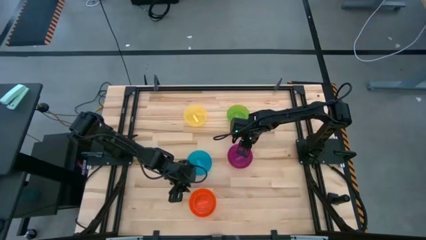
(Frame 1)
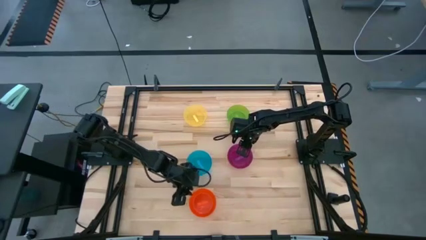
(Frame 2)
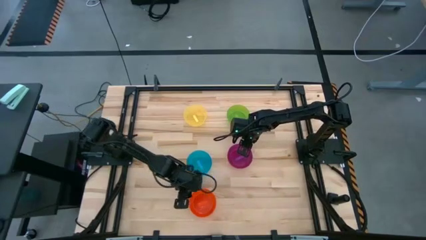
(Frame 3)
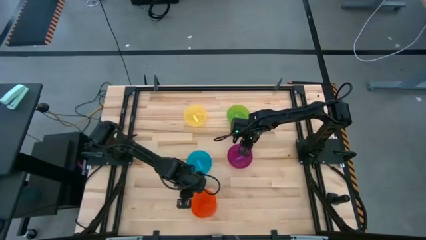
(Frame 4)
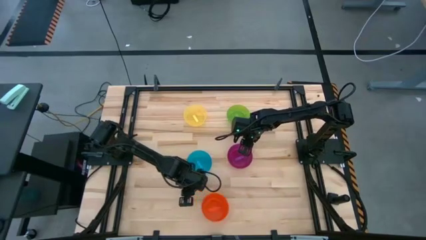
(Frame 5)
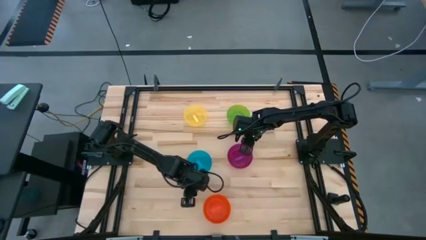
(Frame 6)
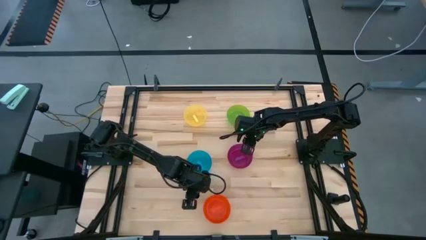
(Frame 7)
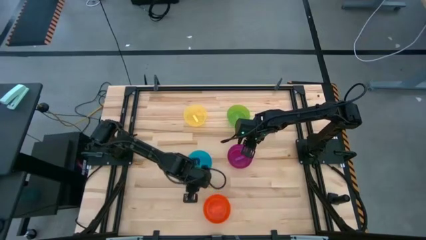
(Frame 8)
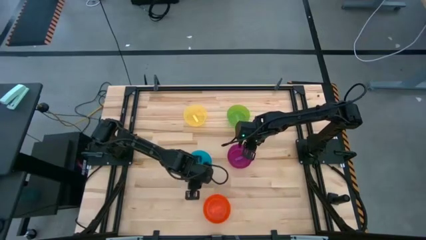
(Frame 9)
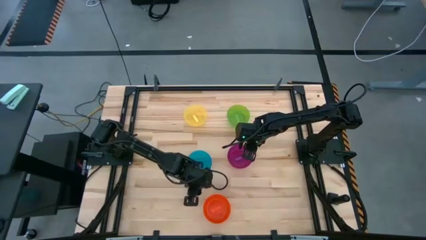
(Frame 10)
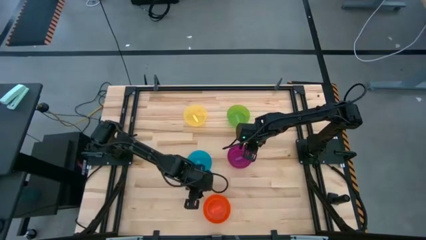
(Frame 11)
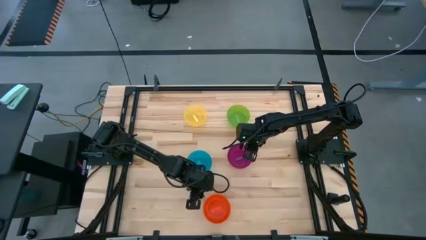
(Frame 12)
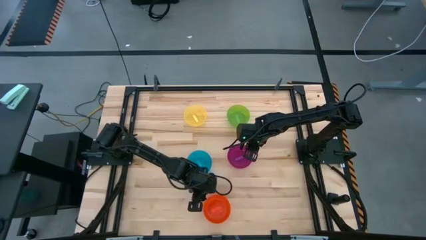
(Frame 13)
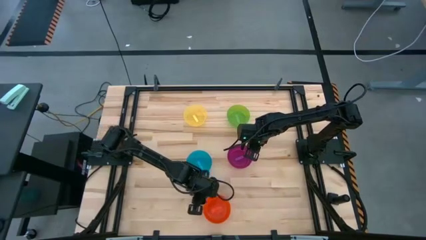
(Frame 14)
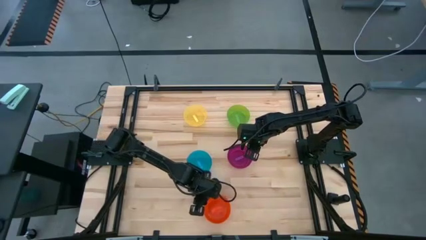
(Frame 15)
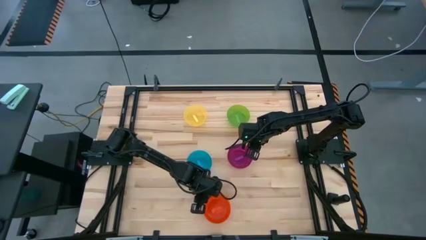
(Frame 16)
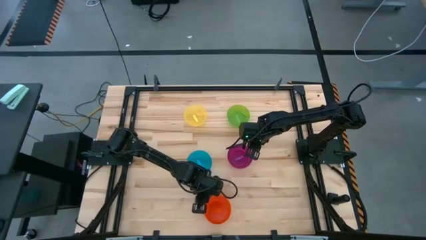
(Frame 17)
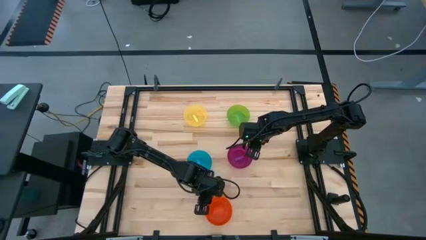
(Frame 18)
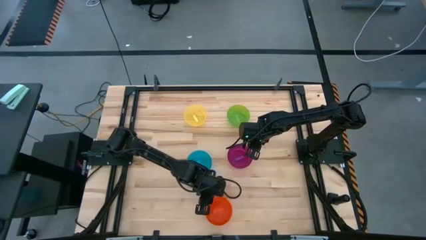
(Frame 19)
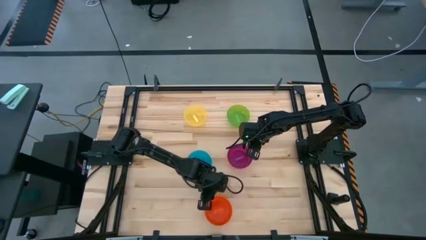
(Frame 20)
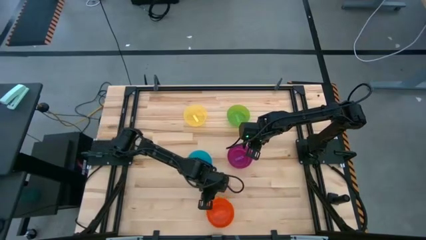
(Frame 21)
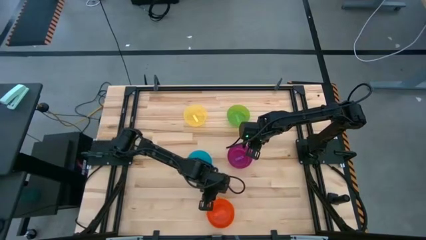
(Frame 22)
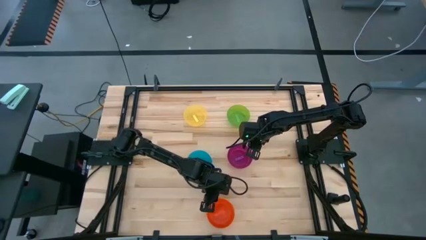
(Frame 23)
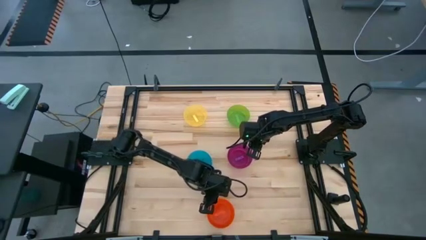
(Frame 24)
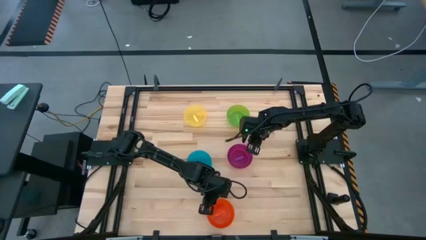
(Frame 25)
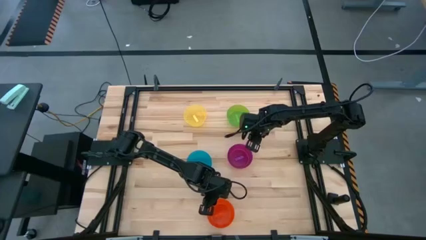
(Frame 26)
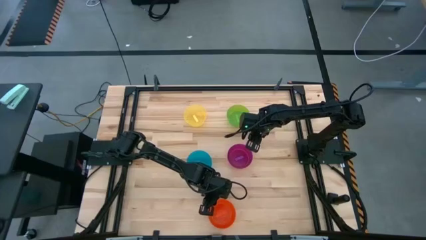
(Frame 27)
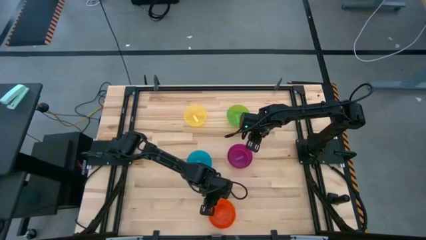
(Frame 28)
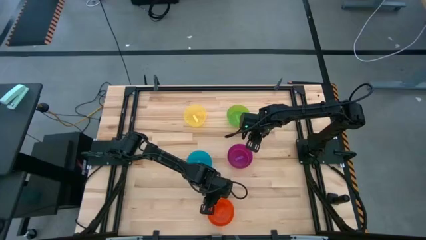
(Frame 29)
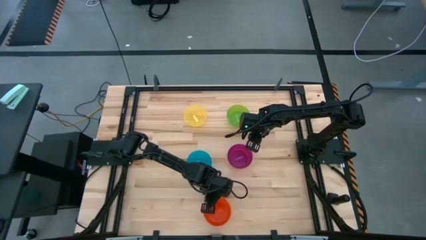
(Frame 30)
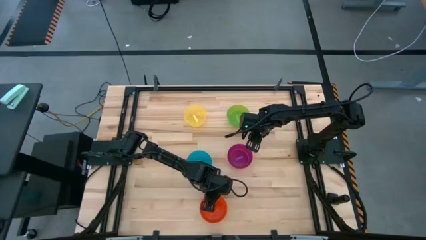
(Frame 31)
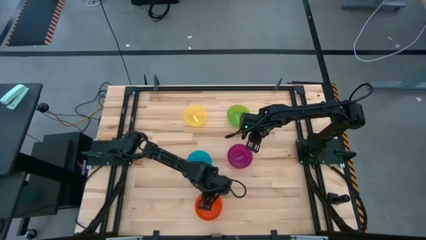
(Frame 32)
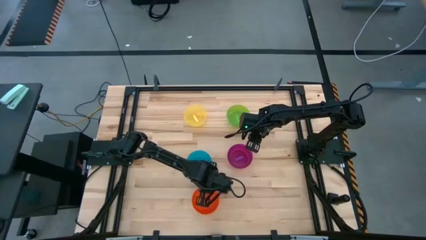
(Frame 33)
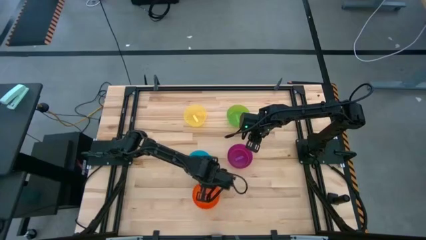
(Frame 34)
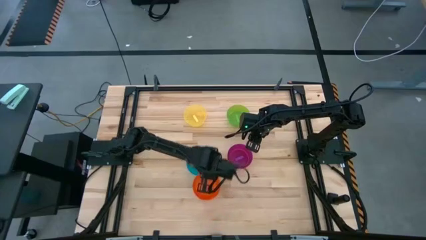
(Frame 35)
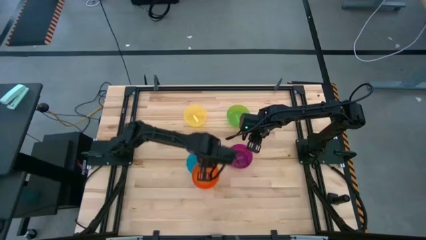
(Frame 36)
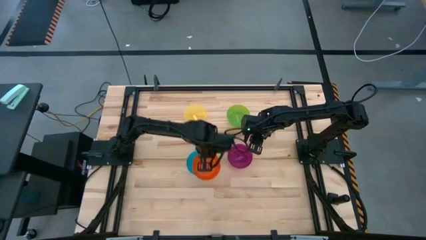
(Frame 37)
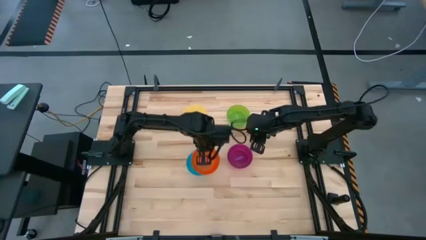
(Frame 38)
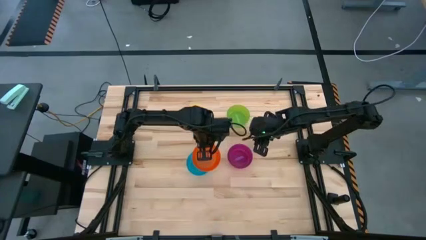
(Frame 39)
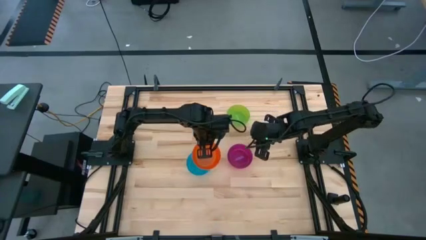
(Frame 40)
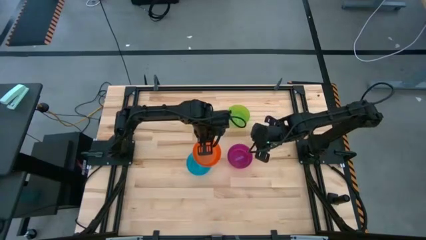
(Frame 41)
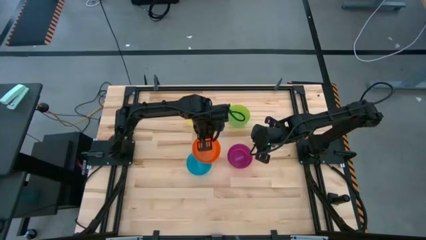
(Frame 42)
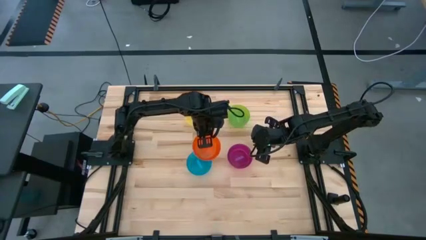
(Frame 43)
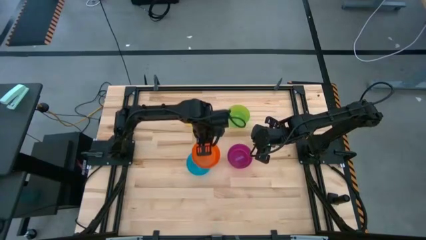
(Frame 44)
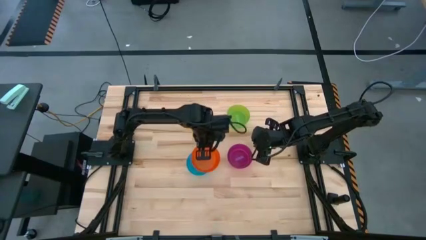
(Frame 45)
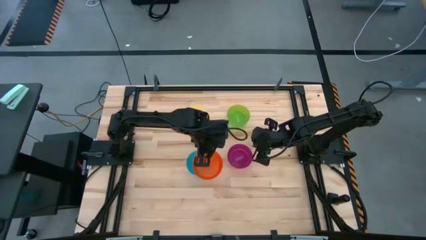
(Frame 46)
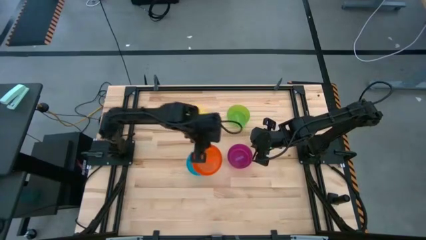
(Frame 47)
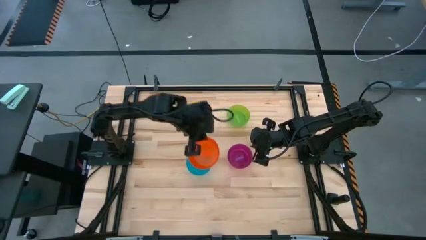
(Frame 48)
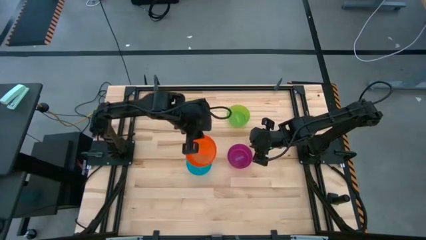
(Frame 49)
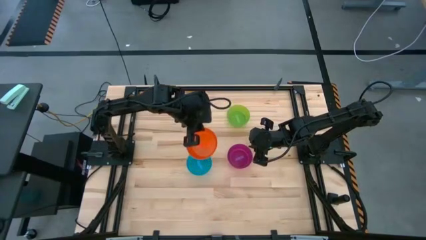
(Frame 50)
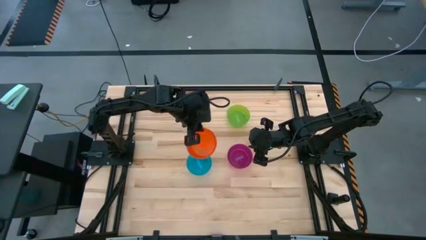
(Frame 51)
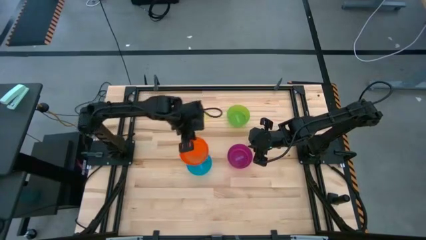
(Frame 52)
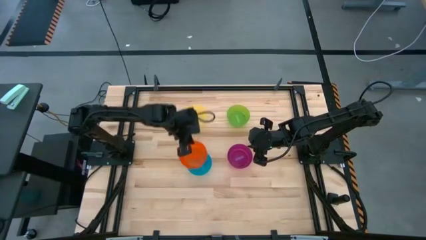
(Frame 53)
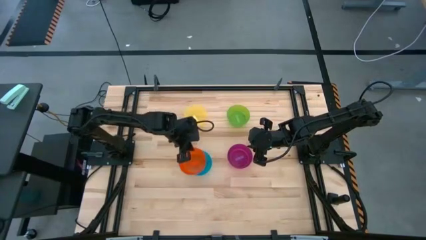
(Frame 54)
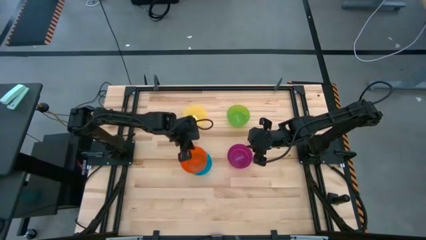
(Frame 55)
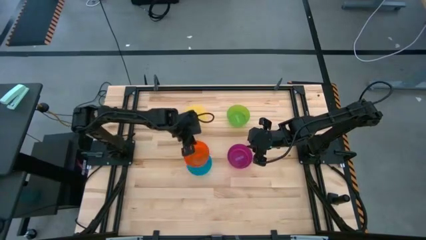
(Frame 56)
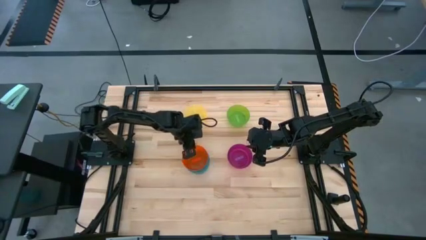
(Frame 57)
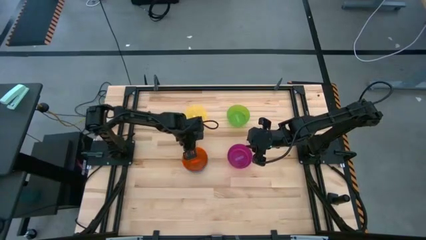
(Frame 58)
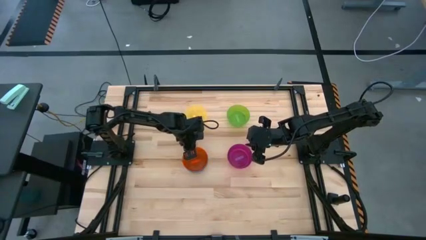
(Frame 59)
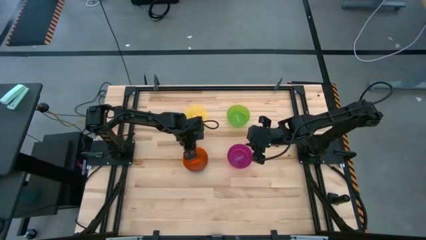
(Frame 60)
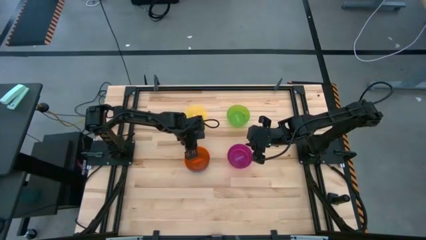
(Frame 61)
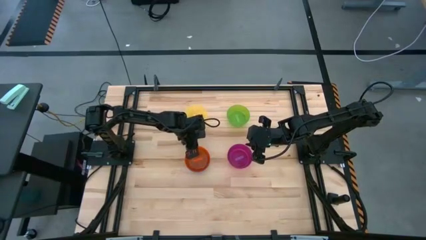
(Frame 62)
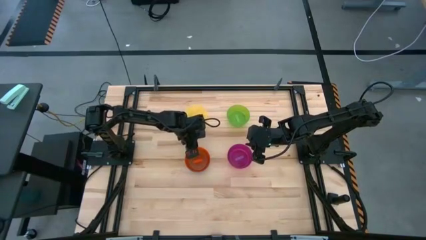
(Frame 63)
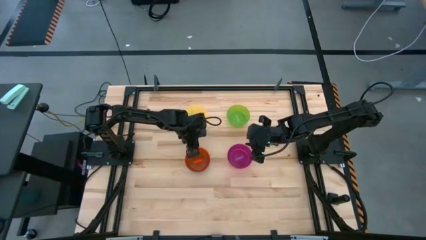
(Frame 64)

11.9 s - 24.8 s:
Task: Nest bowls inside each other
Stack the orange bowl on top of the blue bowl

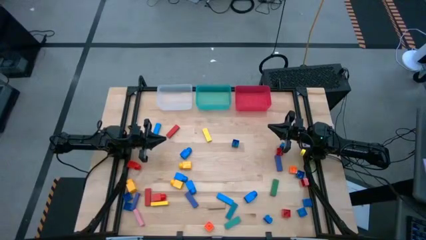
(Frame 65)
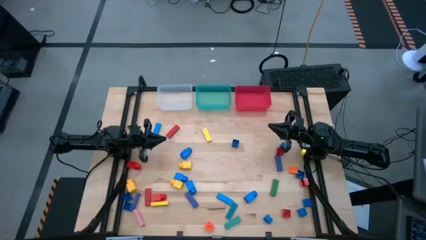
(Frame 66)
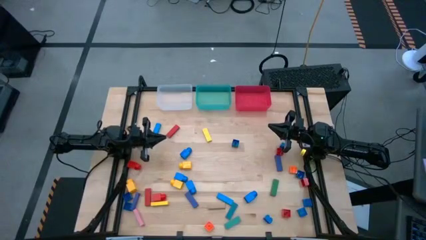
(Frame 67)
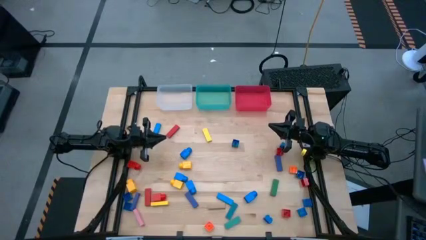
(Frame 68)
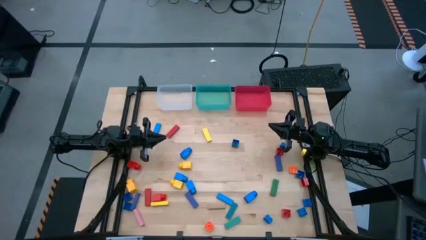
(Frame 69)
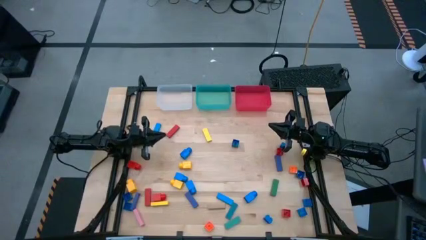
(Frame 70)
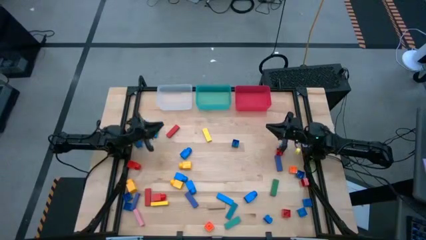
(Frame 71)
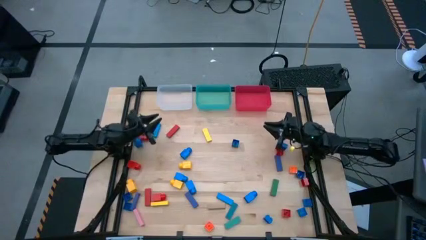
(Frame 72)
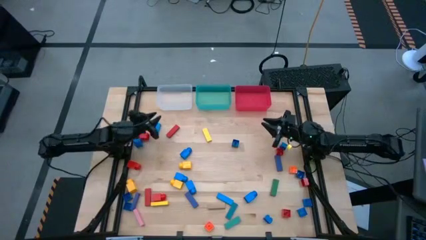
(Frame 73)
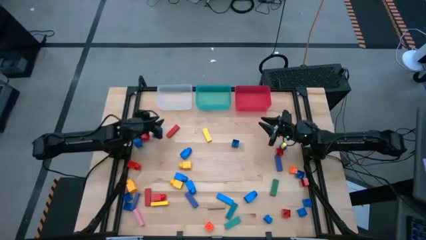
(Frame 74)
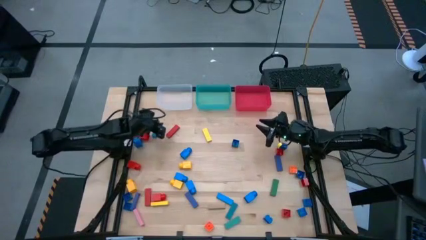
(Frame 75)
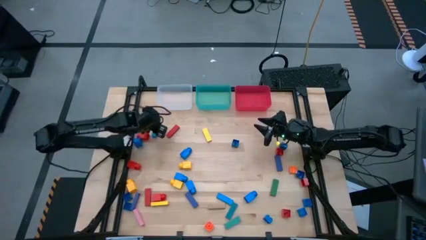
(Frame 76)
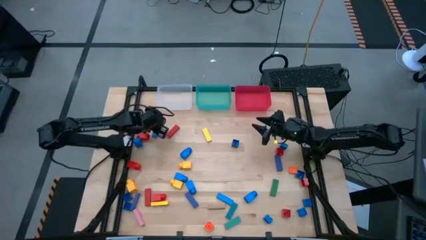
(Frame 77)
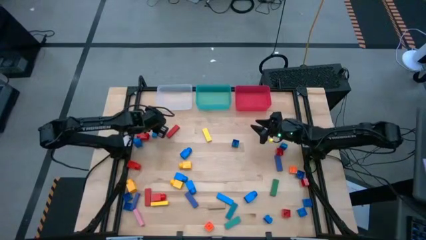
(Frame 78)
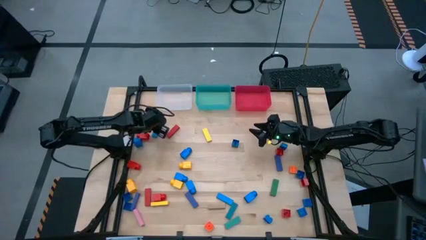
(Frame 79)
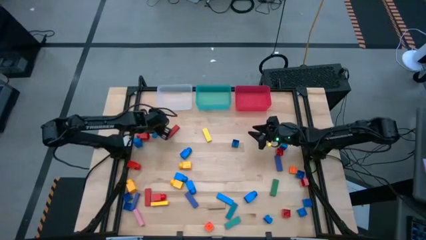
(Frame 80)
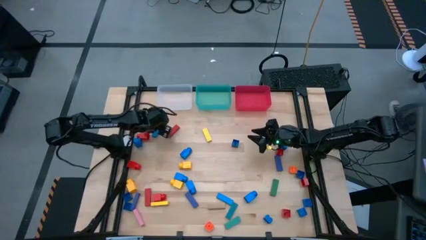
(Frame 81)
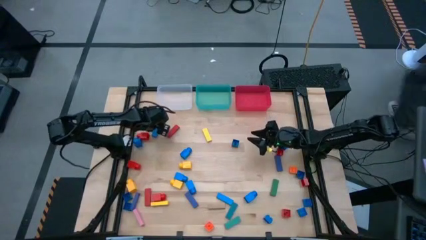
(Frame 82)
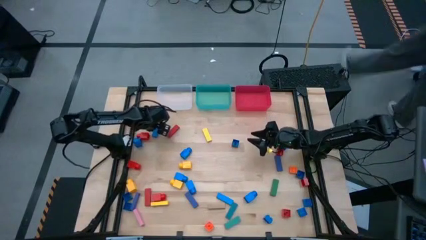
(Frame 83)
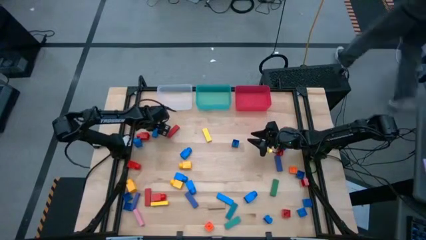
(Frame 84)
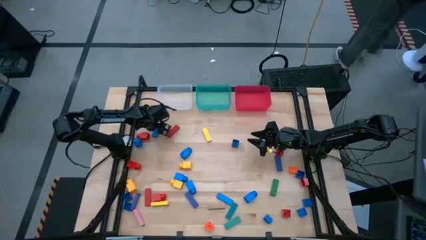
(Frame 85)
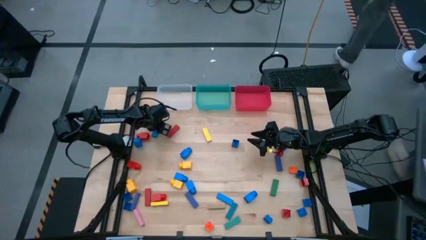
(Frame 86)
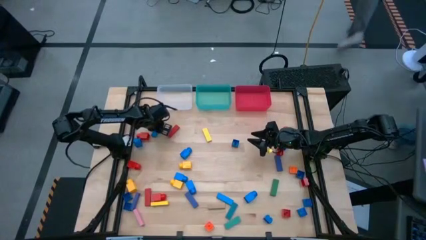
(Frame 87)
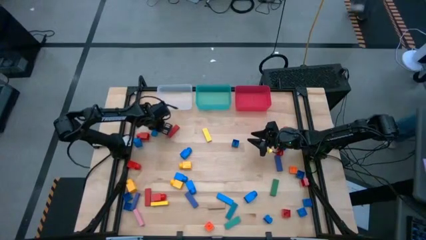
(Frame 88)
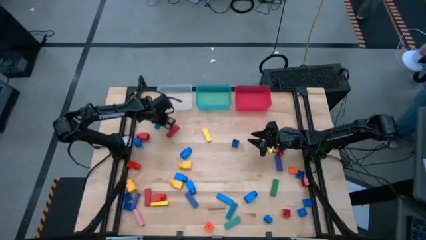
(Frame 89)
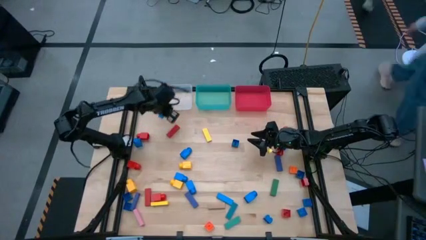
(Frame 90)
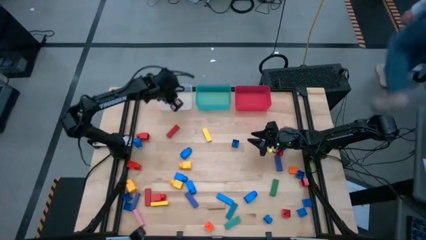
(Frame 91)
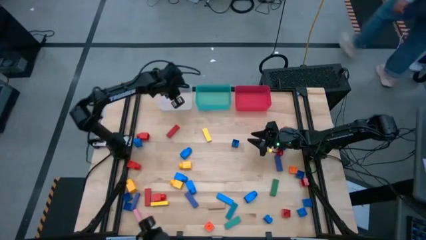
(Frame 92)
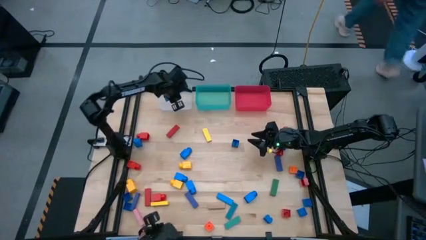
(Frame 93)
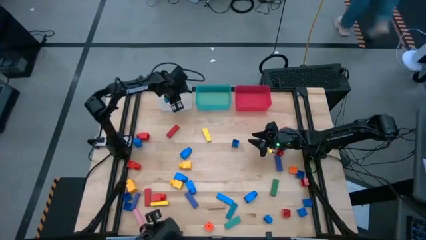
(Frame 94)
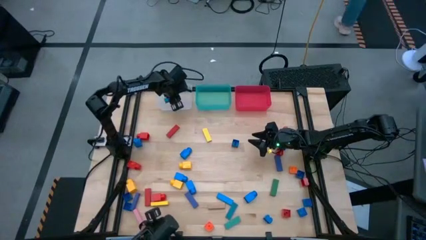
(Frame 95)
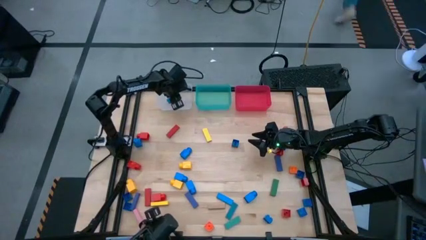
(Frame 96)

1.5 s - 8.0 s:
Task: Sort blocks by size
Put the blue block into the transparent bin
